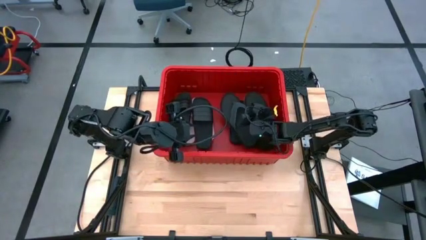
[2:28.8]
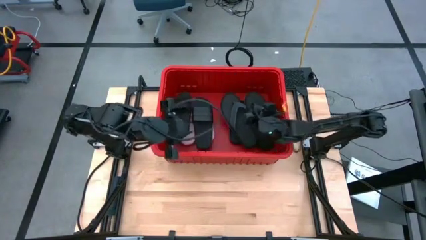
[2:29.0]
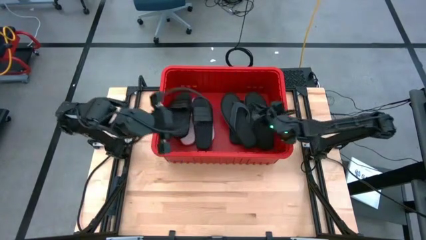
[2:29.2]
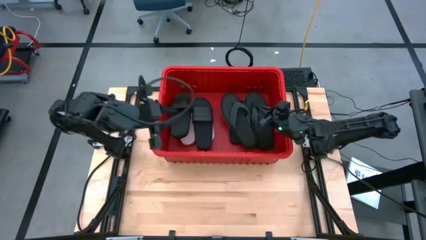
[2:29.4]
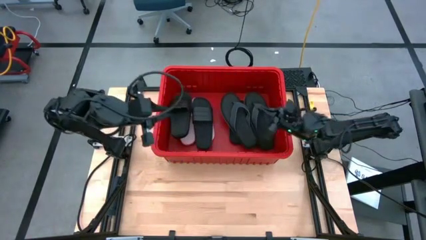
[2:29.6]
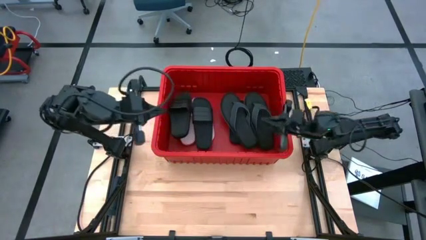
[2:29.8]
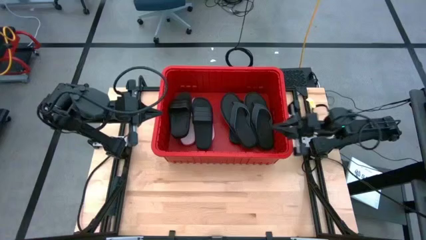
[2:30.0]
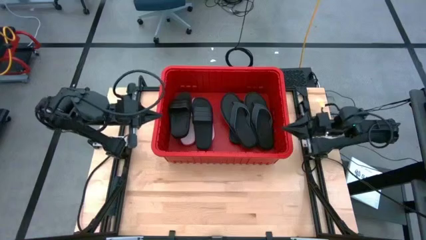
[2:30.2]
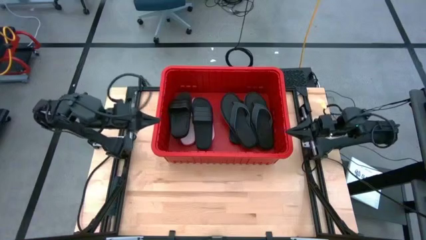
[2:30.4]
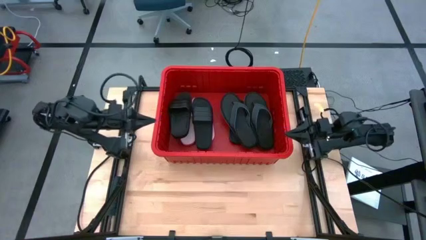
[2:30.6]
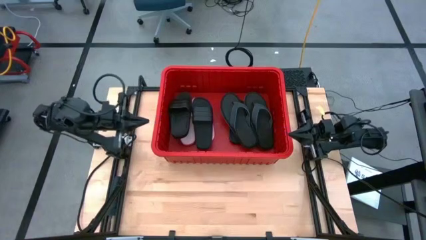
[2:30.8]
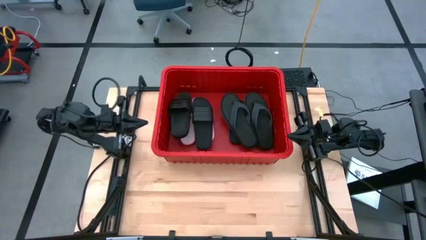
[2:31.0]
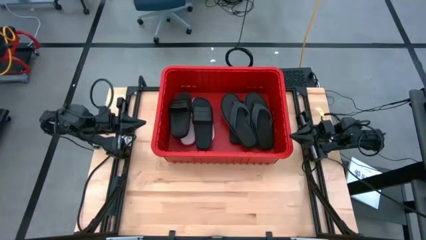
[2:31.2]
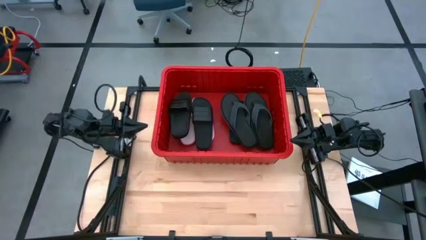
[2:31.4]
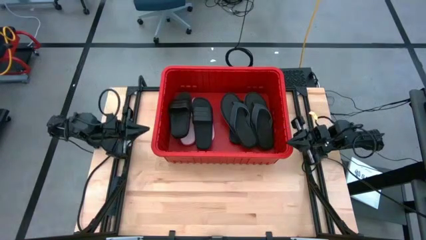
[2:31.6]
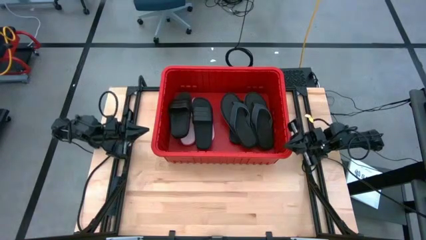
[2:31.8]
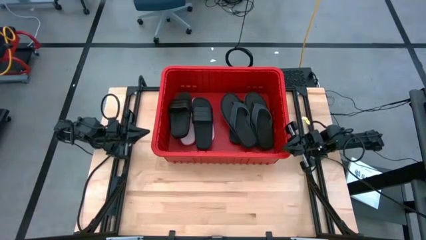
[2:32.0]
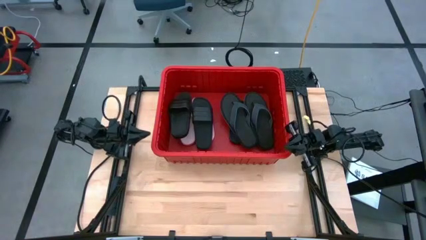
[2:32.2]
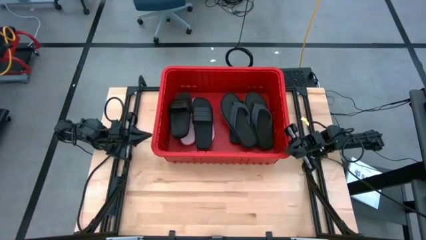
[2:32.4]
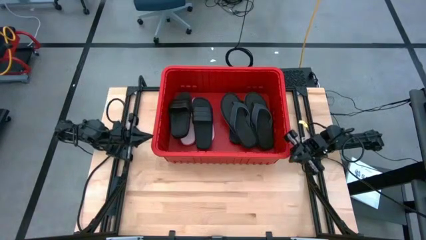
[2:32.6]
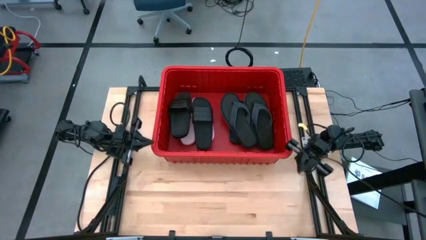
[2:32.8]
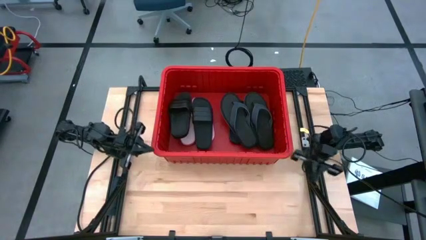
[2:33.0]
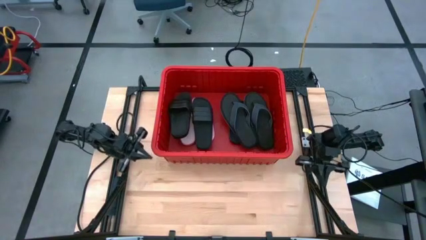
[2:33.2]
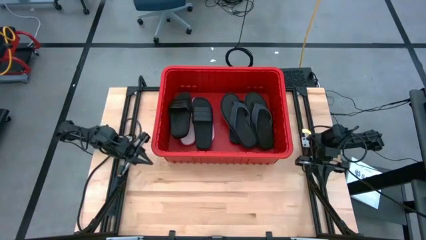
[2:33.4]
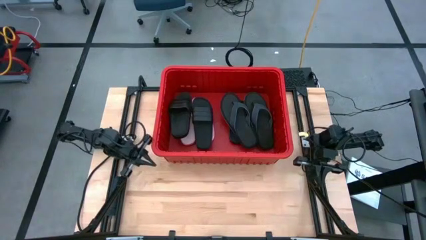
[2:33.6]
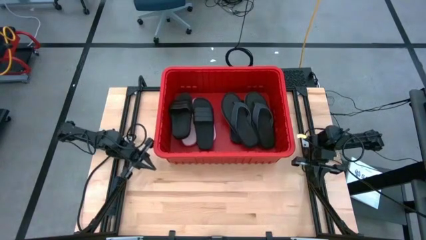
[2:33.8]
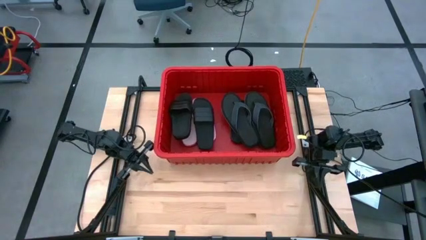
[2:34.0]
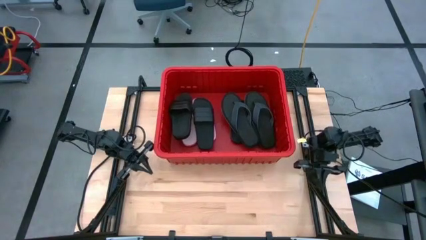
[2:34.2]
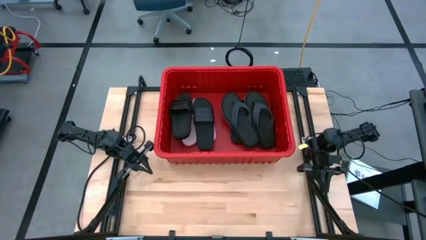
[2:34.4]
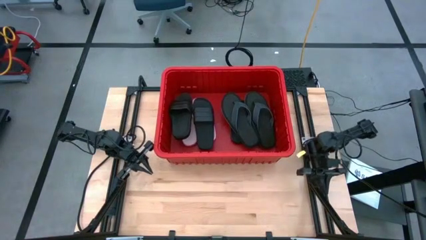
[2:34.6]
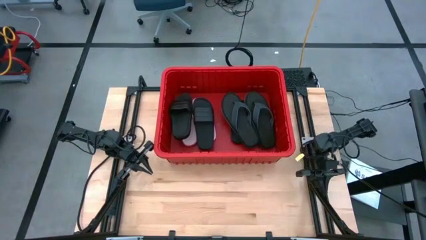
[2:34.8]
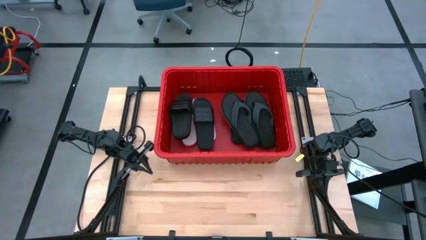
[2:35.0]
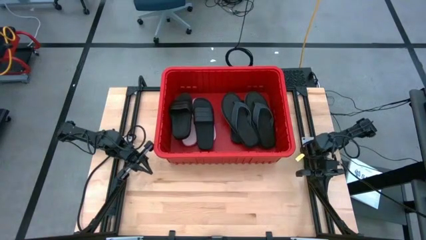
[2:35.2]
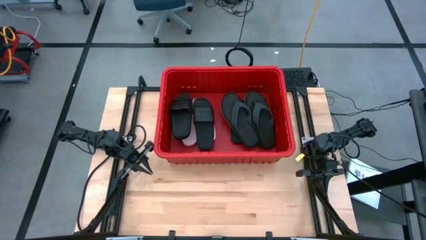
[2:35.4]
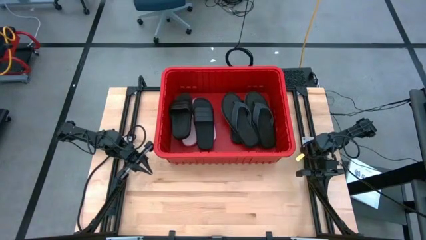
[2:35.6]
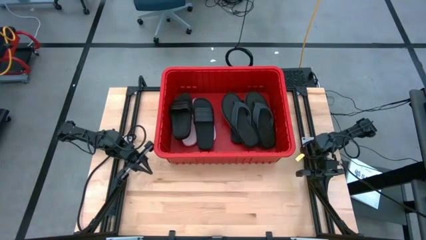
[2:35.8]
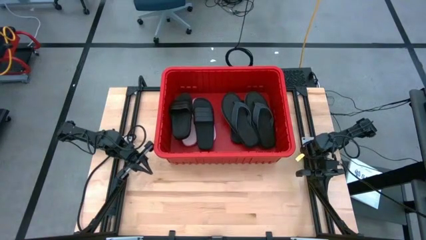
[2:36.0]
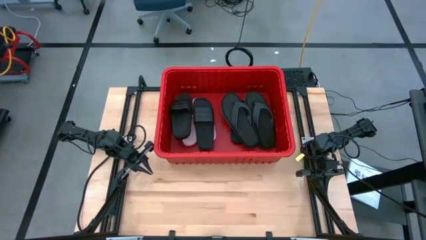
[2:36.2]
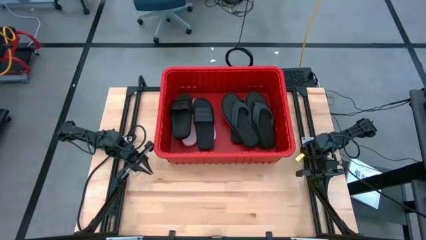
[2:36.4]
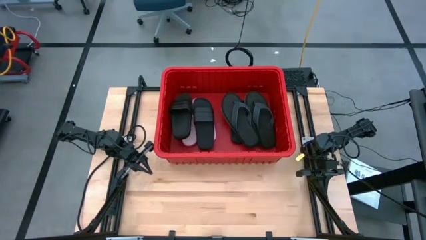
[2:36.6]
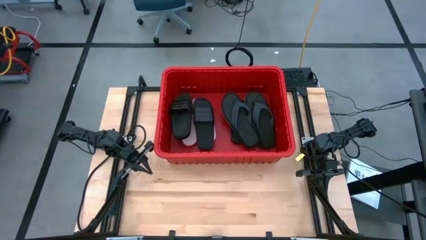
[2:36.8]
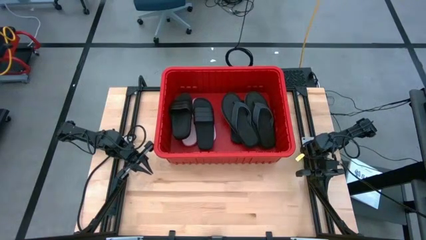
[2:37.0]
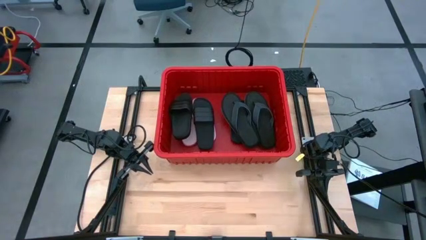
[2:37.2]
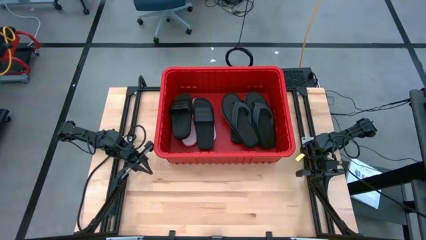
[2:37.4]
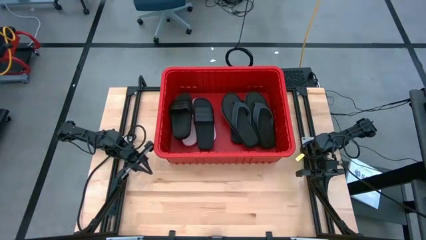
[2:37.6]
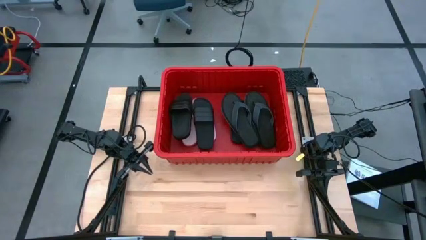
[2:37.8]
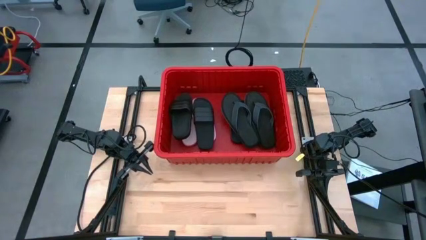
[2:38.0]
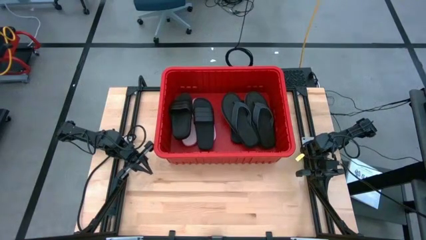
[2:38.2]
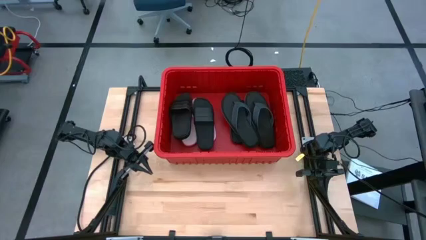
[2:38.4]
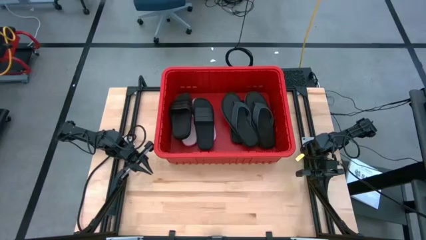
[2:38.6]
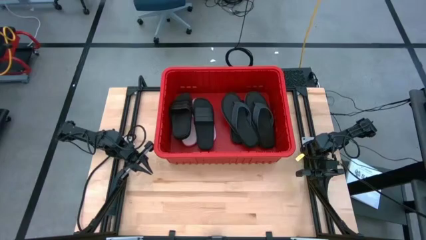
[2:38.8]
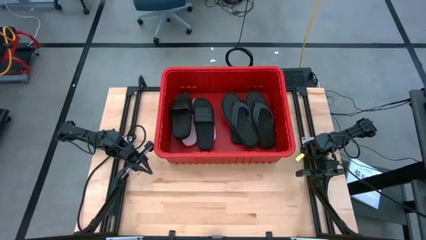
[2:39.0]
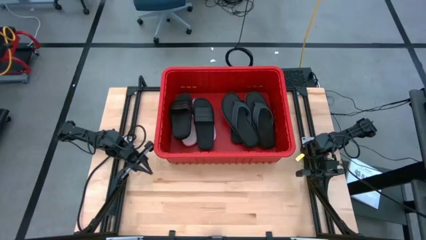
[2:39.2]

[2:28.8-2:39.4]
Task: Pick and place slides into bin
Return to Home Position

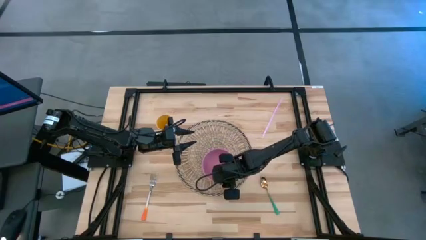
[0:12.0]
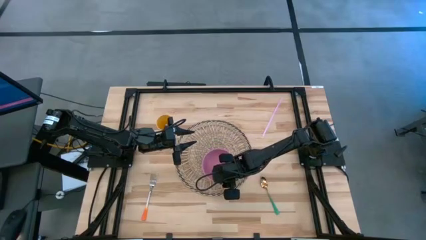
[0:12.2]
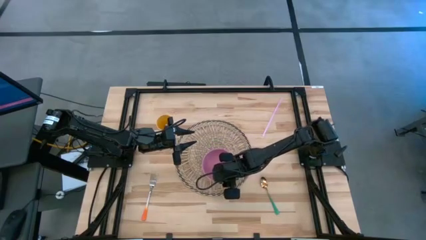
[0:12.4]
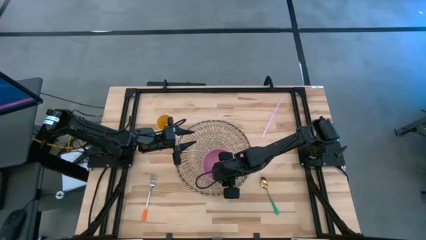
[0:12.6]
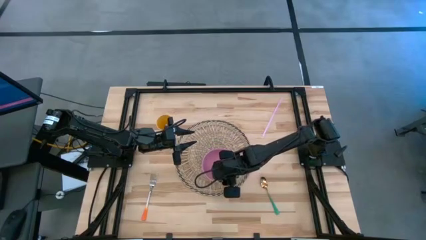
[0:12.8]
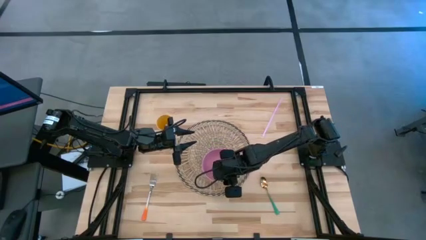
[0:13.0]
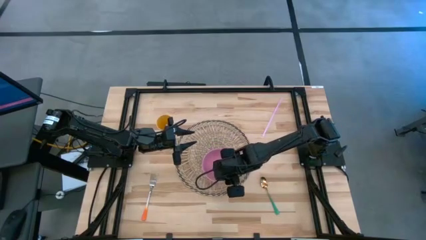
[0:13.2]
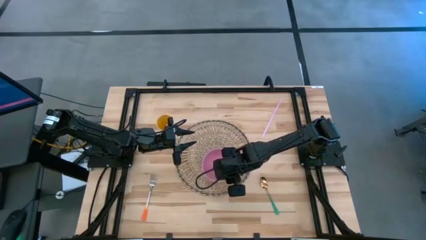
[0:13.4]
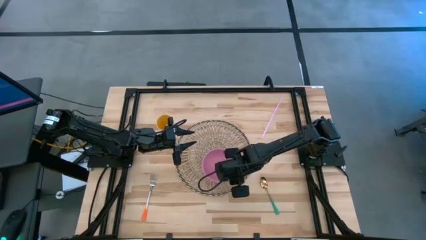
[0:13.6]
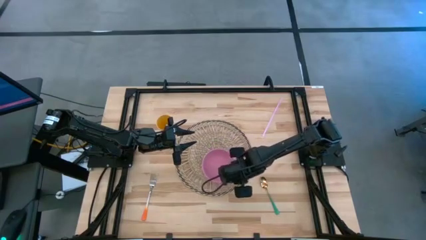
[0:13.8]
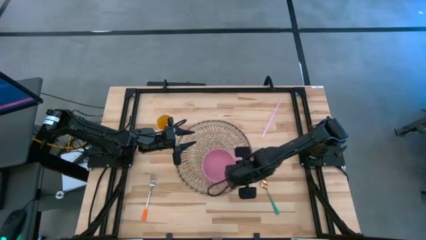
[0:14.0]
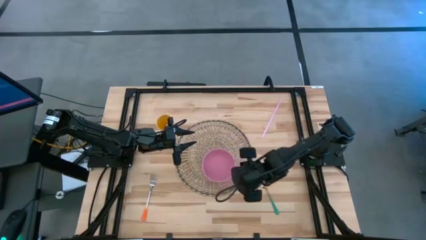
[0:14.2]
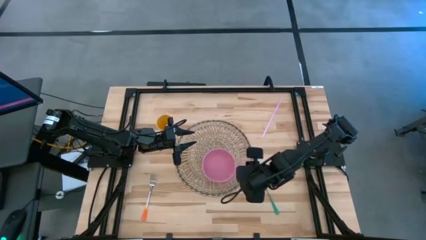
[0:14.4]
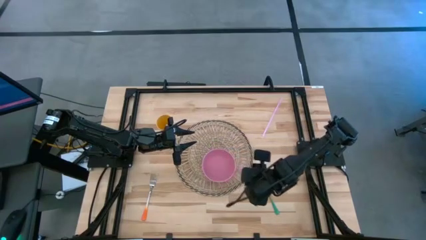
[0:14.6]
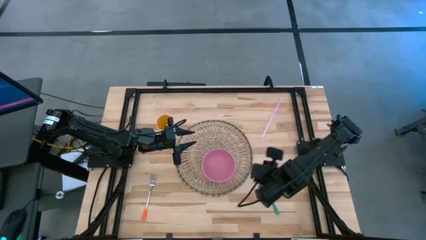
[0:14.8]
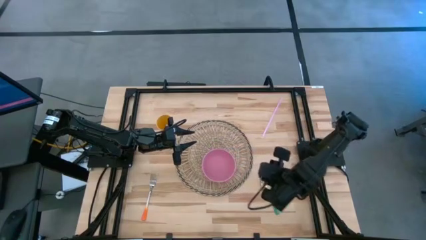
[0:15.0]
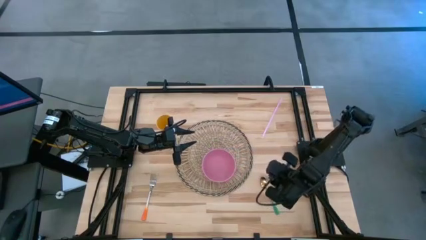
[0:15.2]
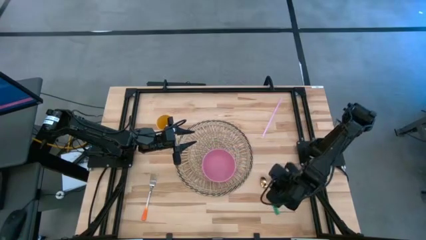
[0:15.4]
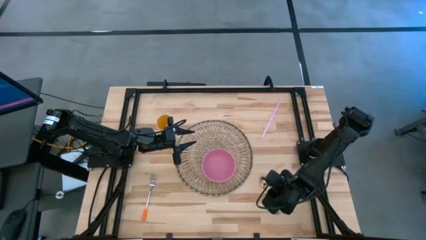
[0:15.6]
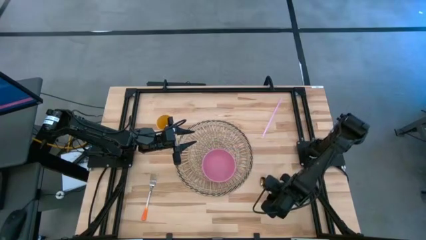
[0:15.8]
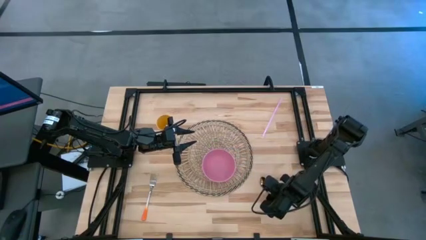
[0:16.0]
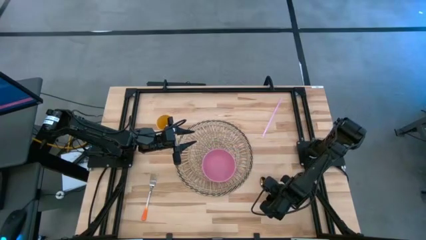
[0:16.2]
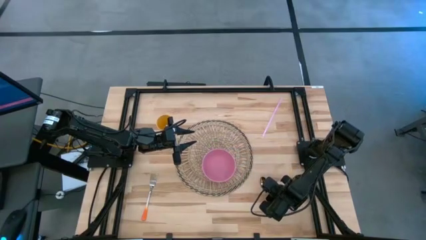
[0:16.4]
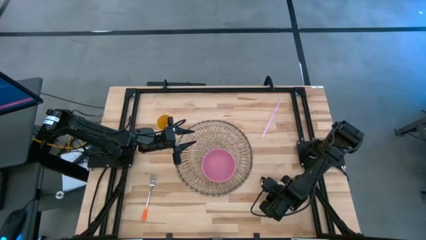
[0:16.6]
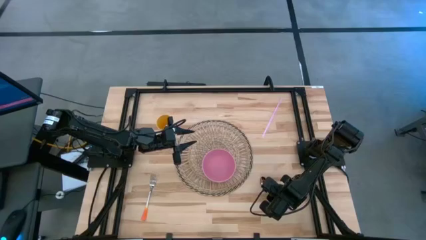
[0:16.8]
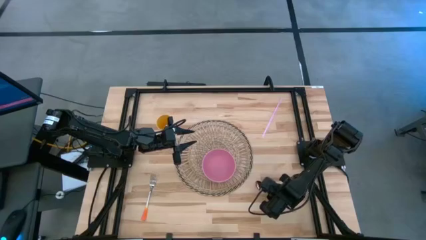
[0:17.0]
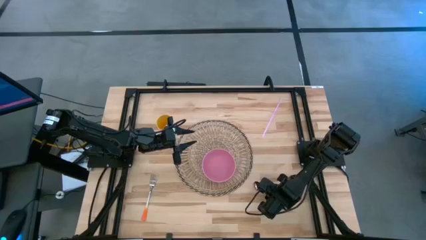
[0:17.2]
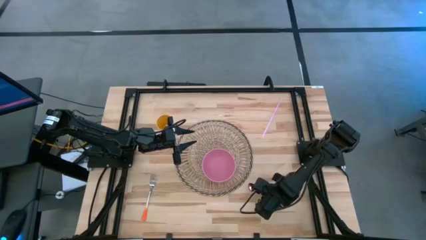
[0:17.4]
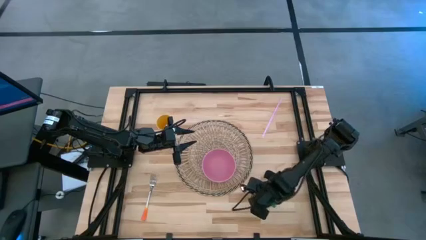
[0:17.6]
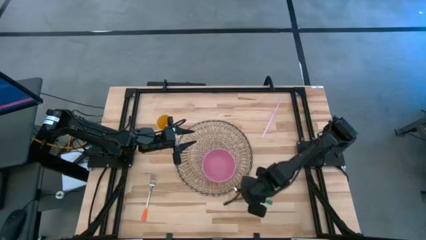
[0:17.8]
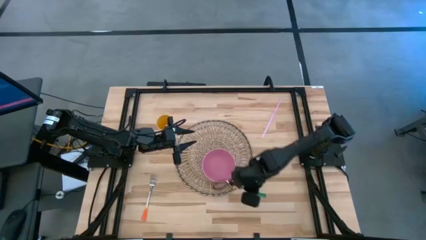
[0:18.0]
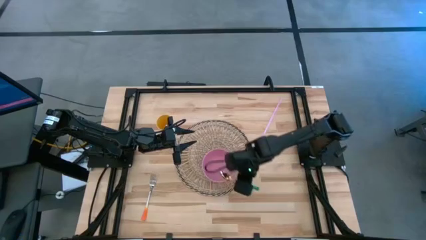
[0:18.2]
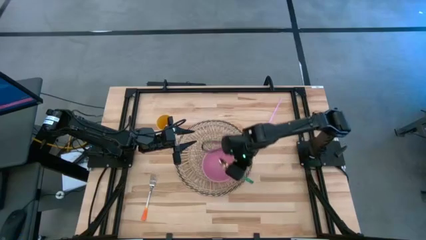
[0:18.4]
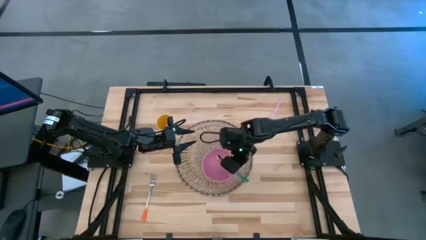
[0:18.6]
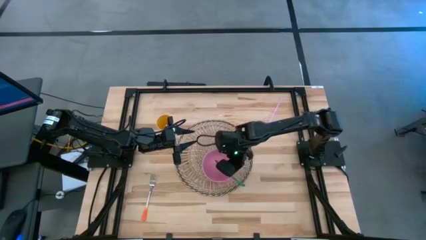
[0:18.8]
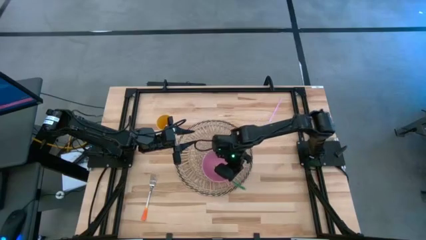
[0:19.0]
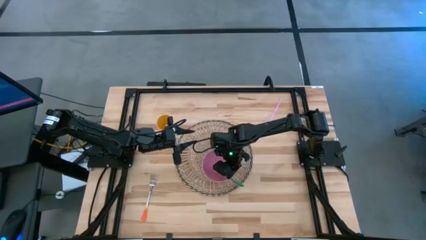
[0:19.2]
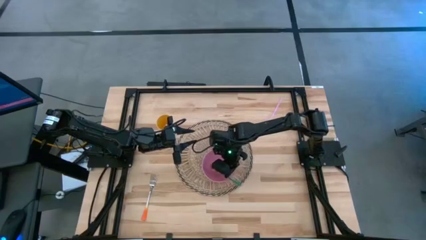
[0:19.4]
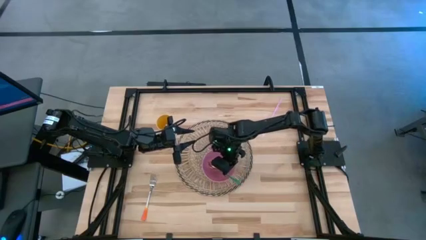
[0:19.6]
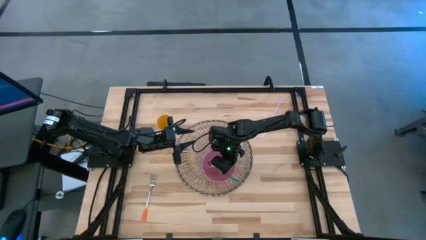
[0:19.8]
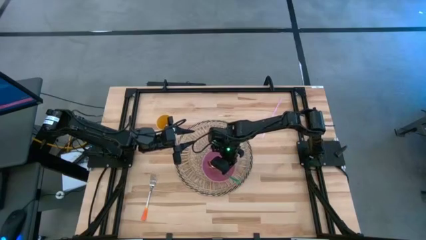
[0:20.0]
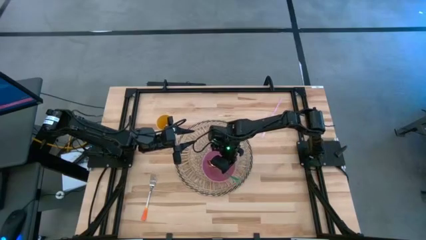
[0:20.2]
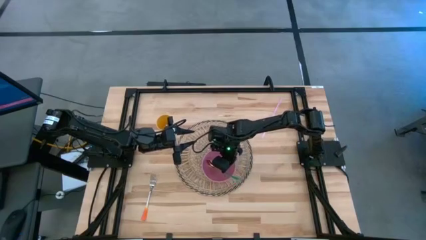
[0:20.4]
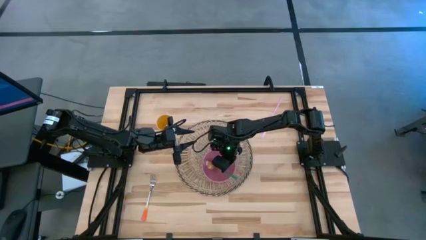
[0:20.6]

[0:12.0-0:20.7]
Task: Pick & Place Utensil
Put the green spoon into the pink bowl
